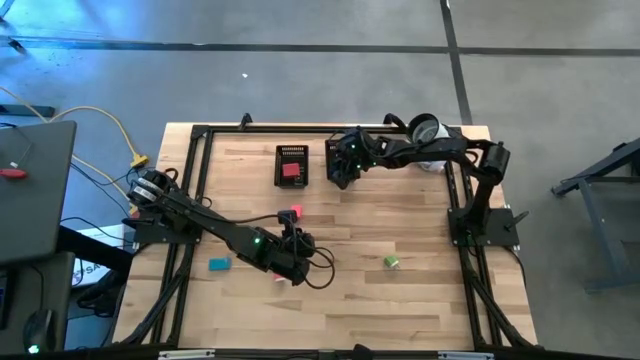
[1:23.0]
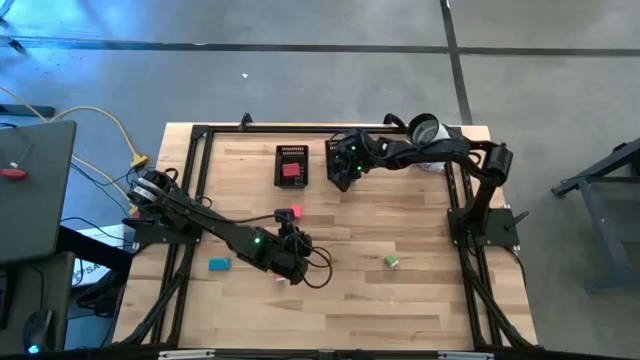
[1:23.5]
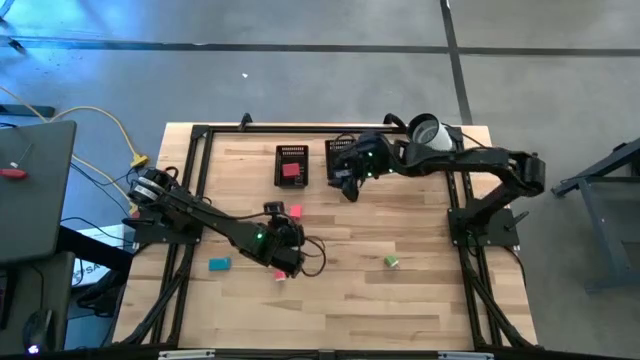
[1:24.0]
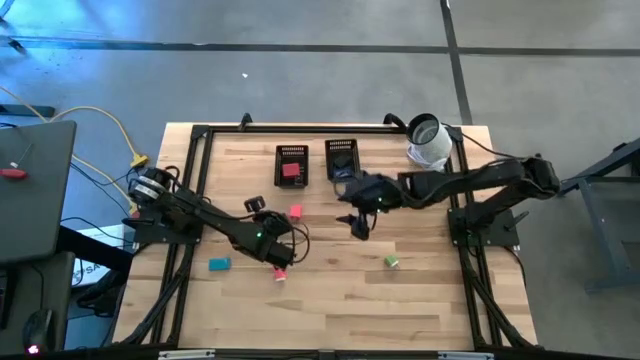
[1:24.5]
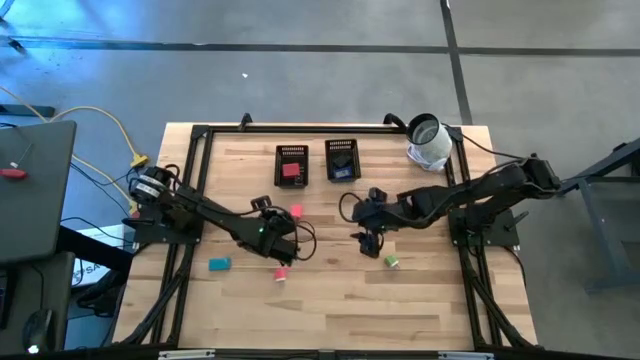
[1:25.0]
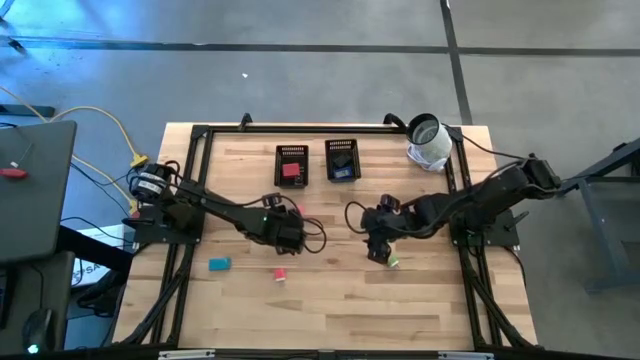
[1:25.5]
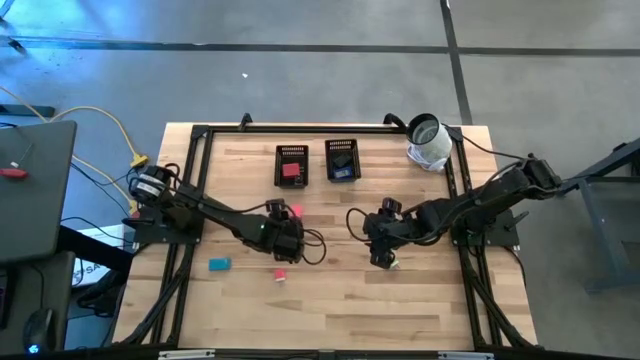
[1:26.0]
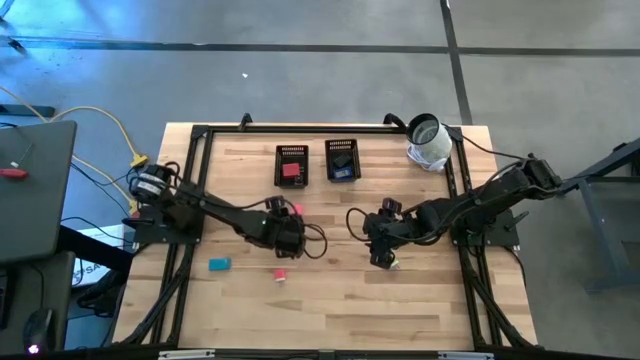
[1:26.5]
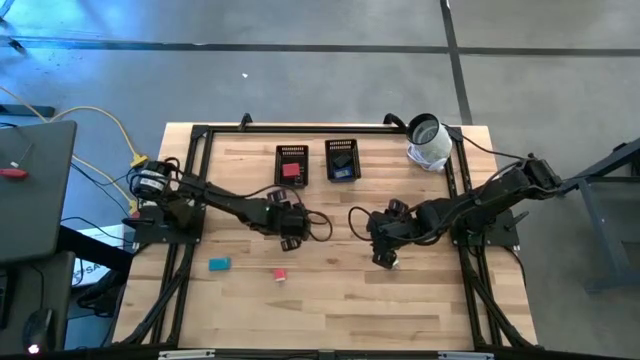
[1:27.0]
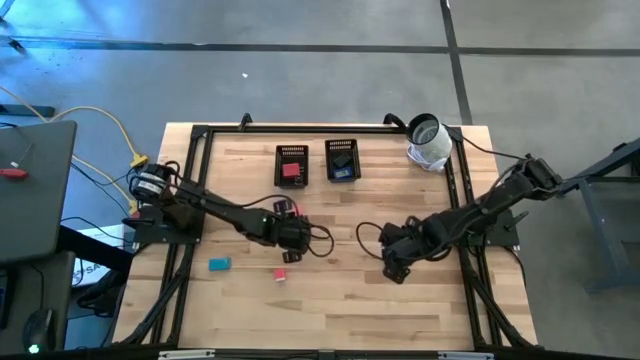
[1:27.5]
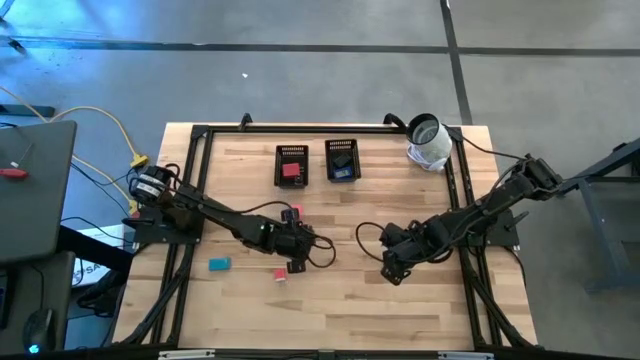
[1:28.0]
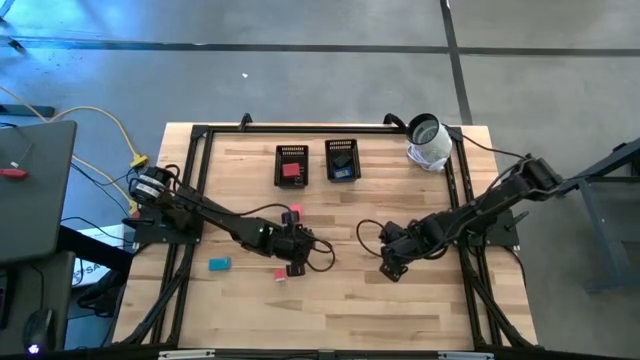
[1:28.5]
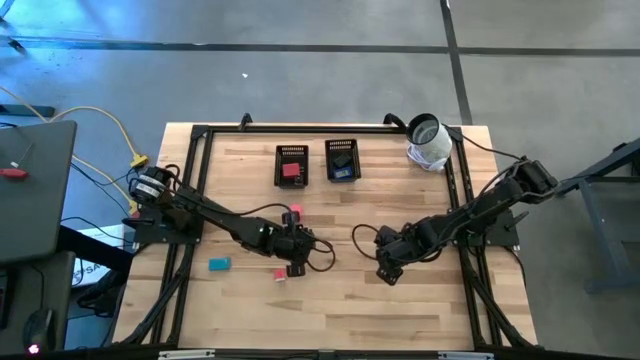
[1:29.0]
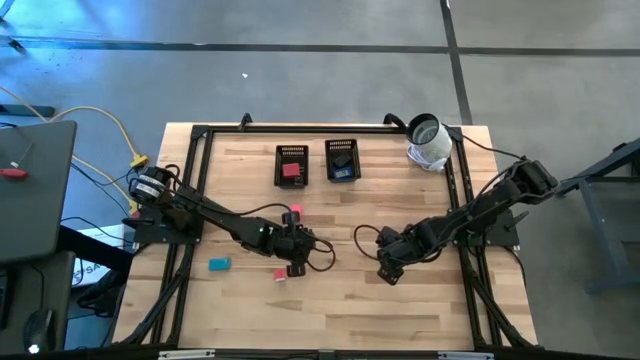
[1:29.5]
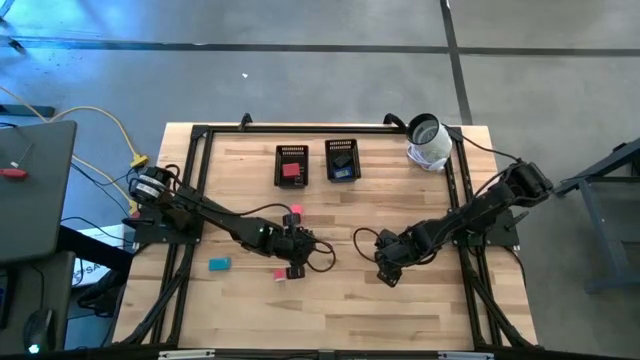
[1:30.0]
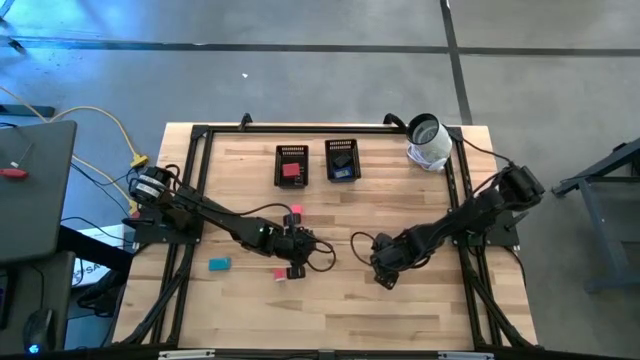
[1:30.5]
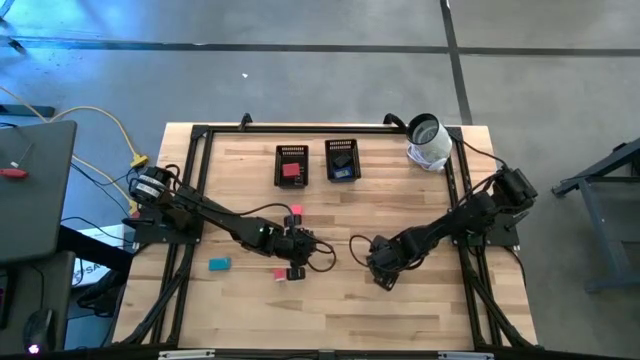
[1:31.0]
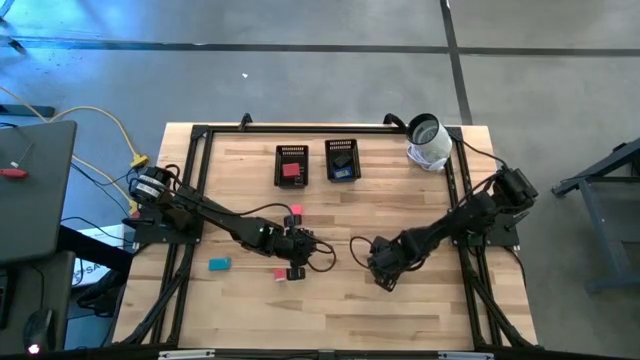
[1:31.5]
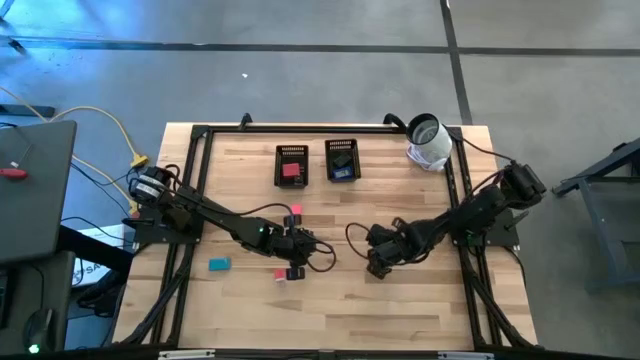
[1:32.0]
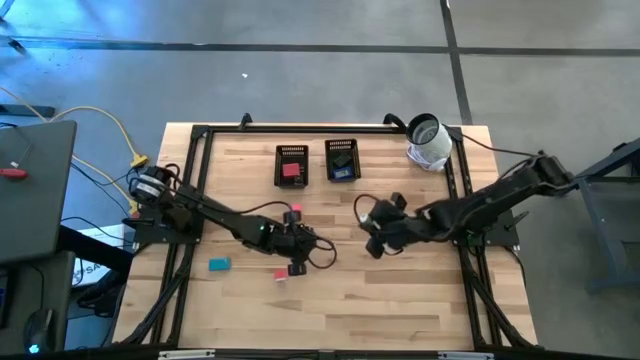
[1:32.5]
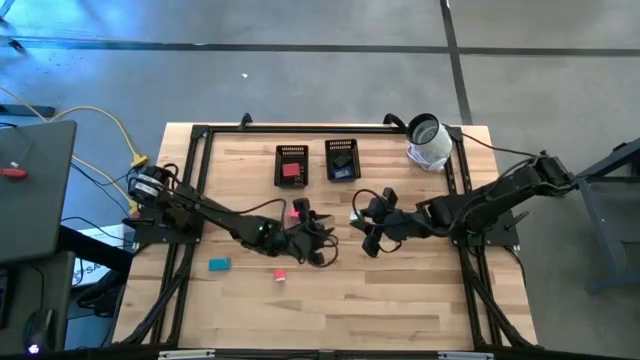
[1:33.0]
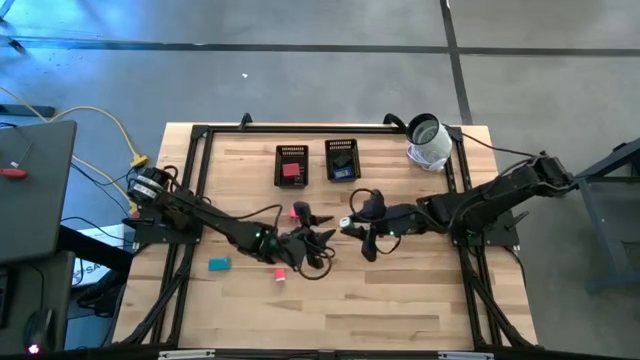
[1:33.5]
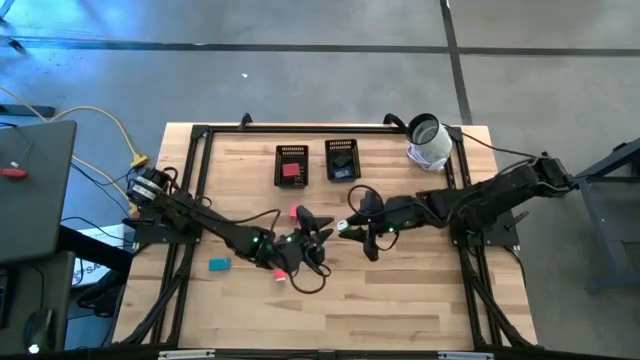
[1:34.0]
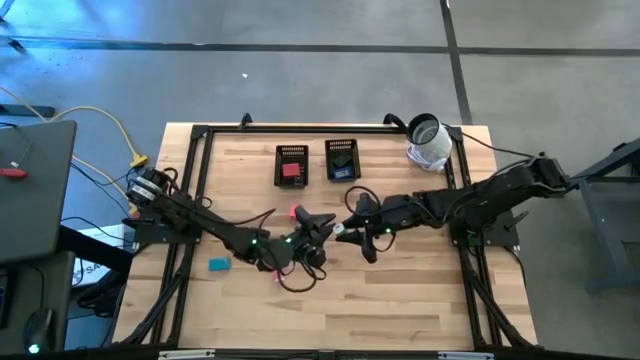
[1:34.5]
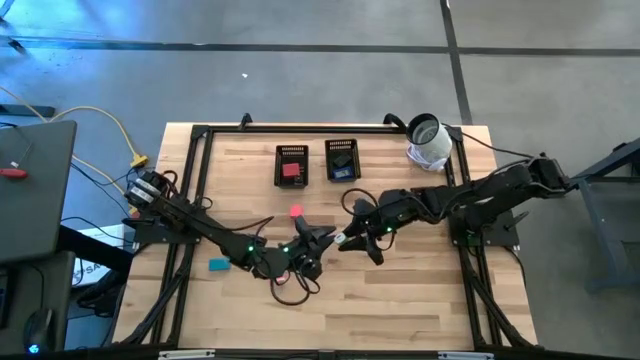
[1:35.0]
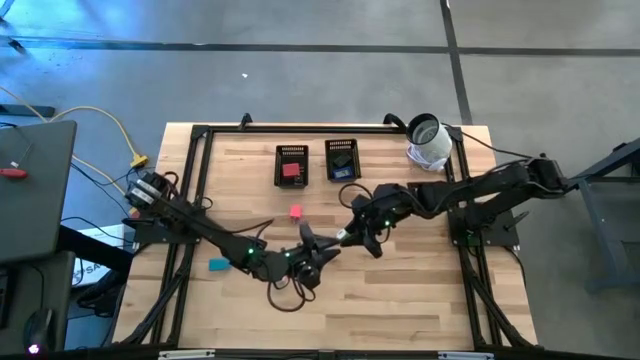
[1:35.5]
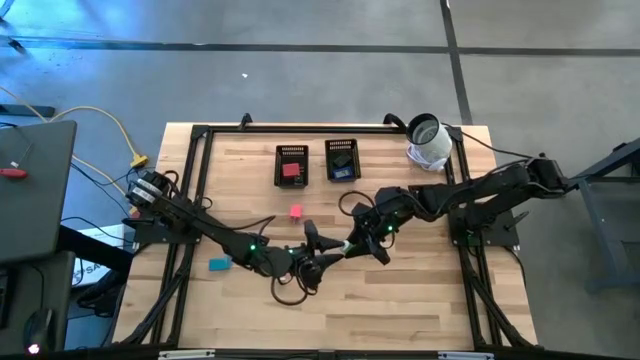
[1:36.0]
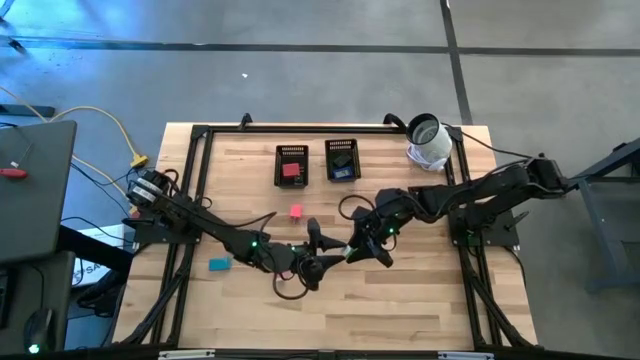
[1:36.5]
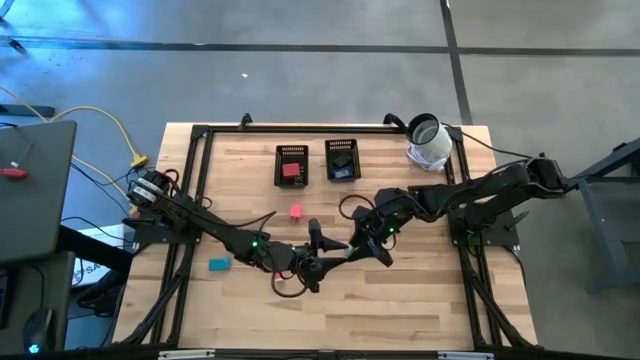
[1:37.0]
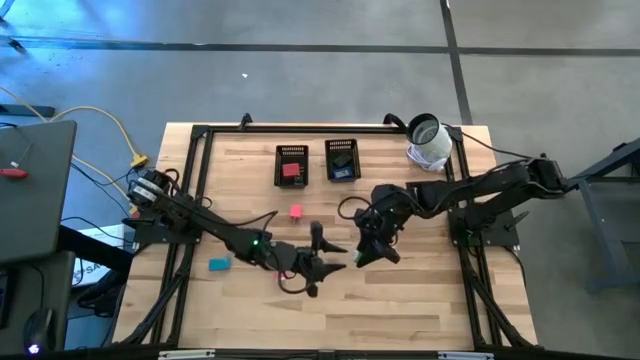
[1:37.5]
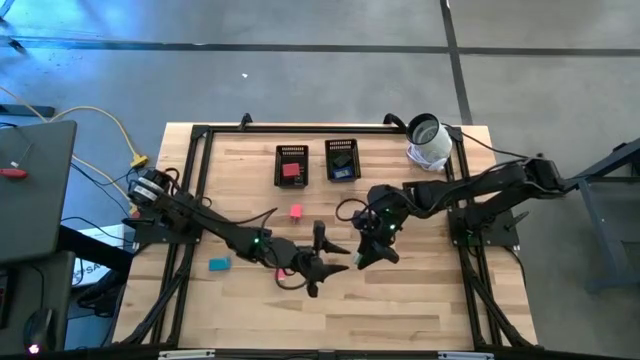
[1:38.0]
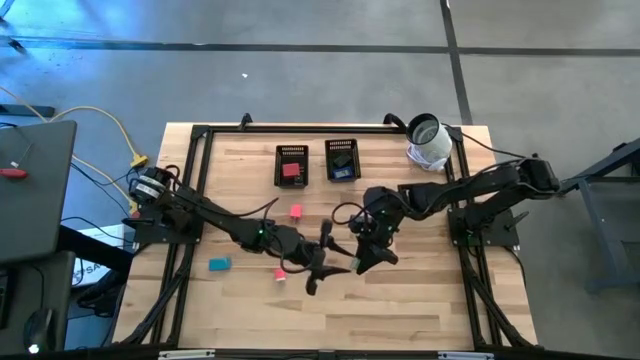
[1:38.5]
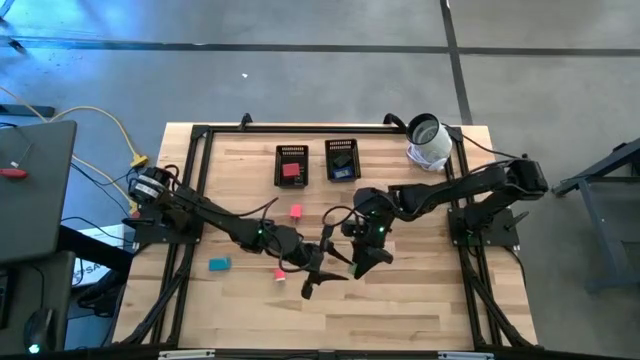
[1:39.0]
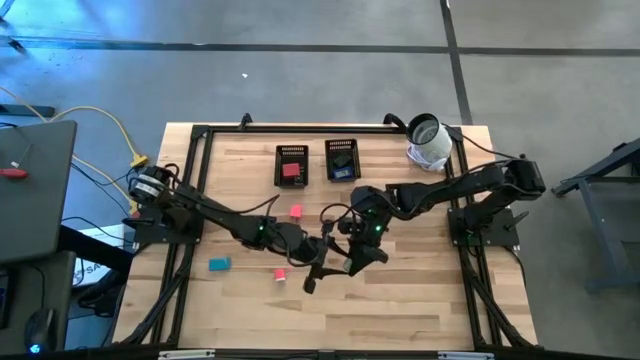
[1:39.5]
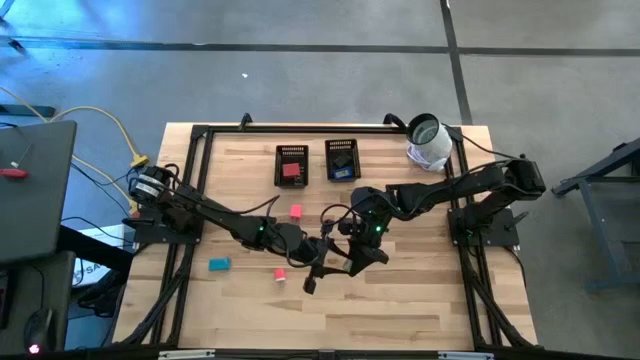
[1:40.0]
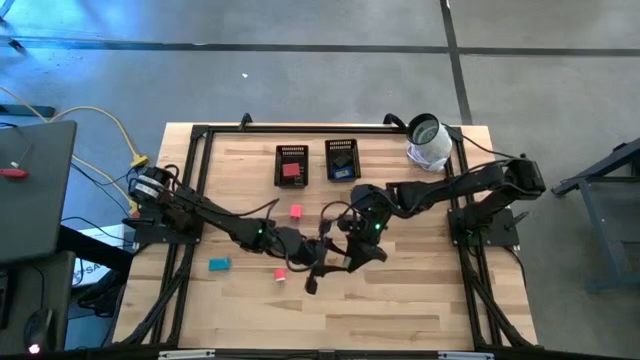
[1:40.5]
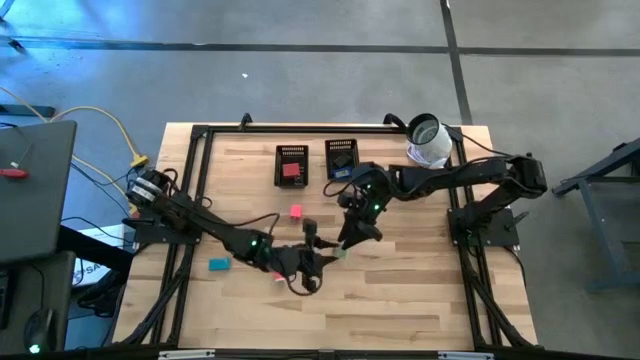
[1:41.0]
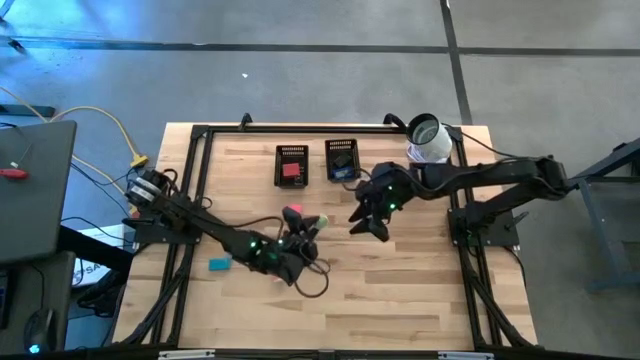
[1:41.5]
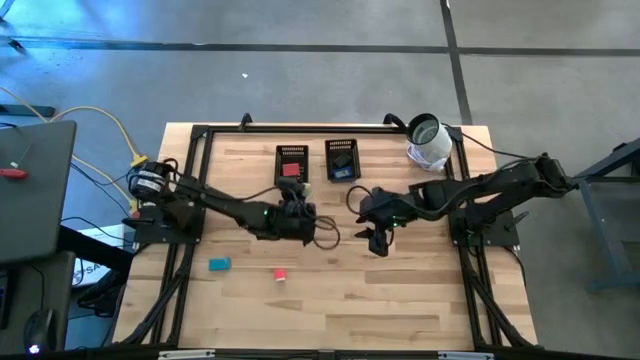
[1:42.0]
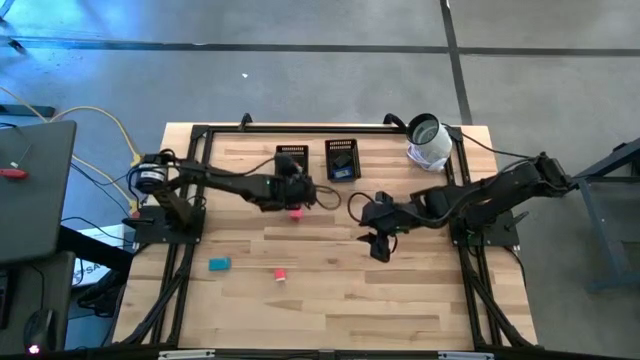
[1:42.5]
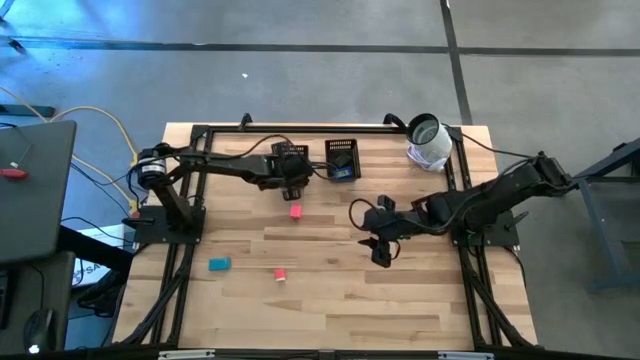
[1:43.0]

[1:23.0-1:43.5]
Task: Pick & Place Office items
Put the green charger adapter into the left black bin
